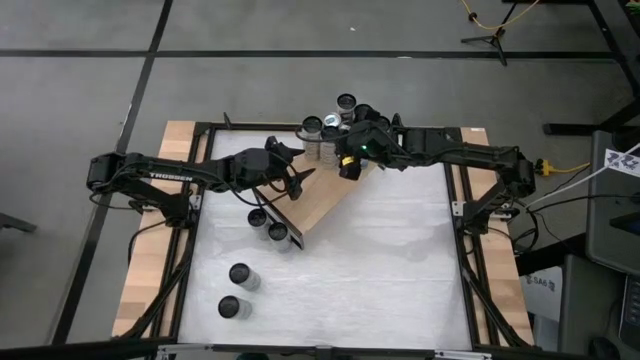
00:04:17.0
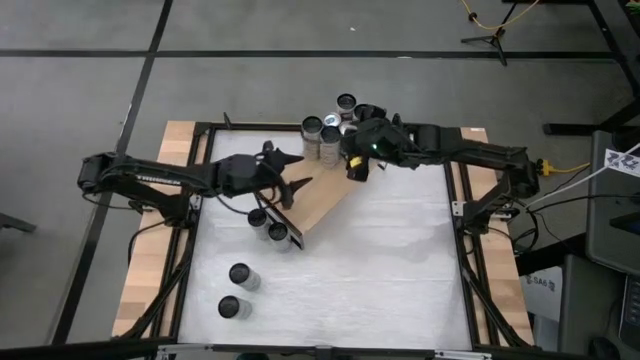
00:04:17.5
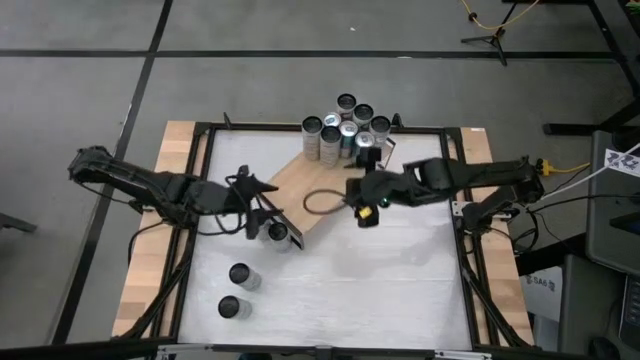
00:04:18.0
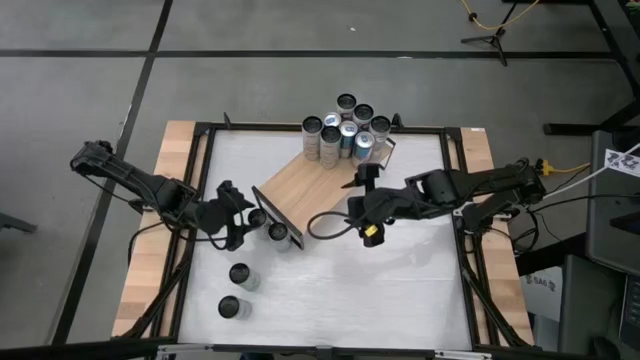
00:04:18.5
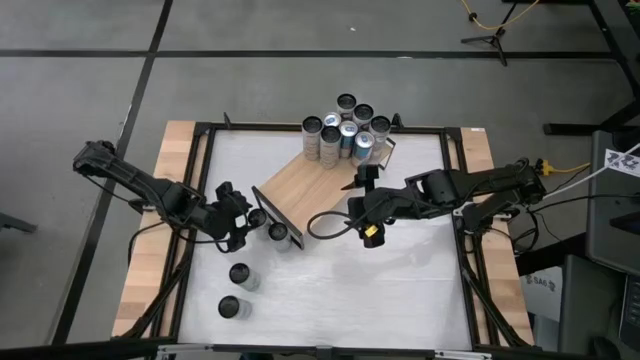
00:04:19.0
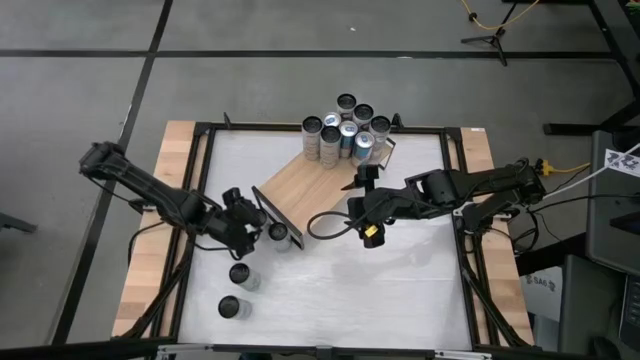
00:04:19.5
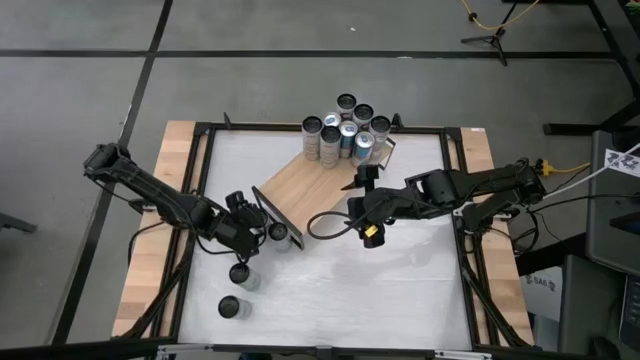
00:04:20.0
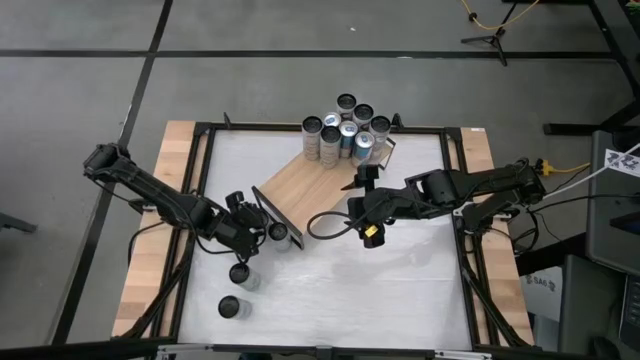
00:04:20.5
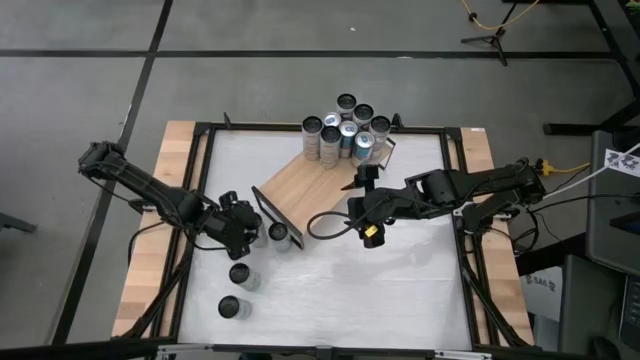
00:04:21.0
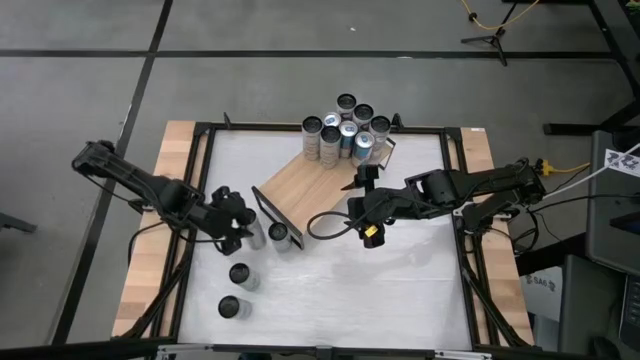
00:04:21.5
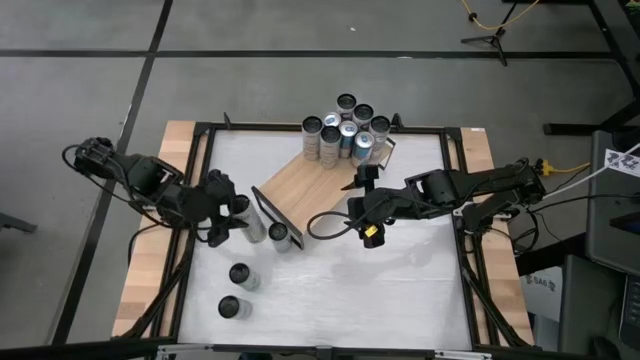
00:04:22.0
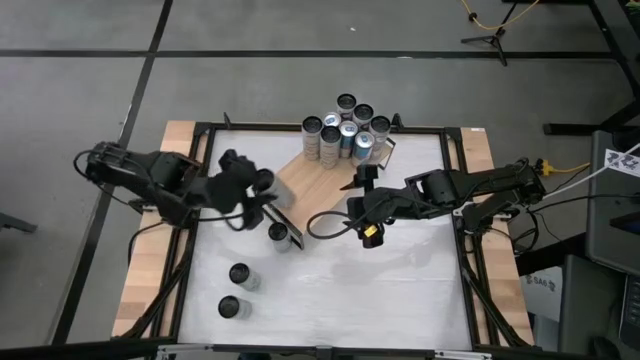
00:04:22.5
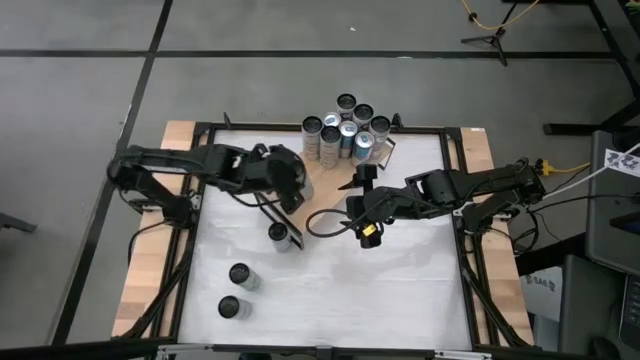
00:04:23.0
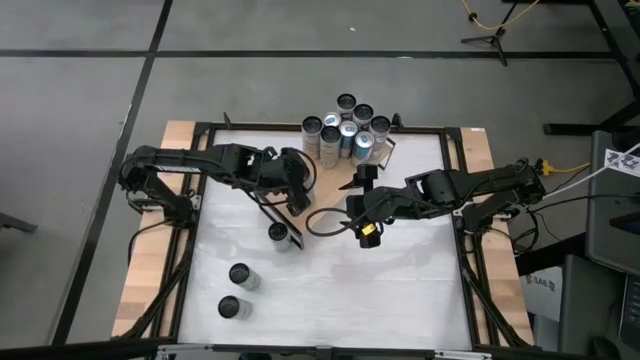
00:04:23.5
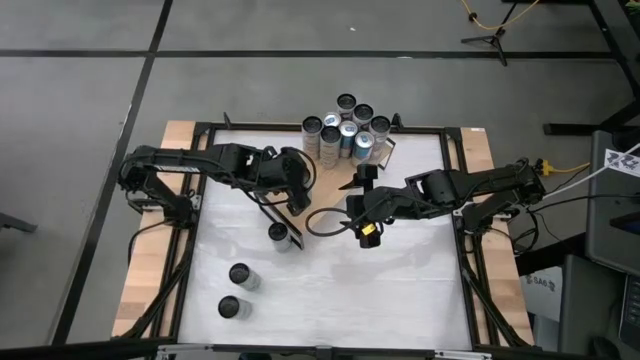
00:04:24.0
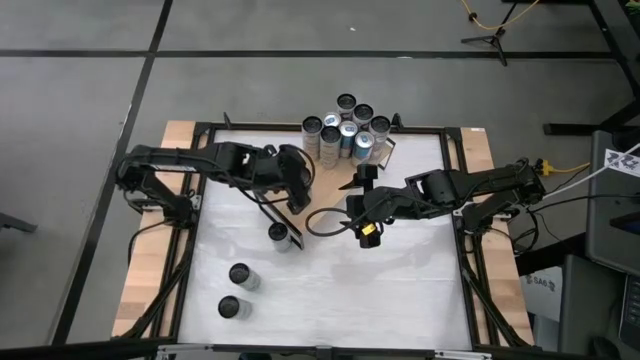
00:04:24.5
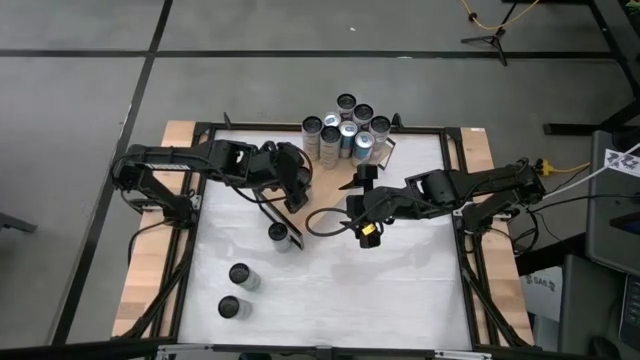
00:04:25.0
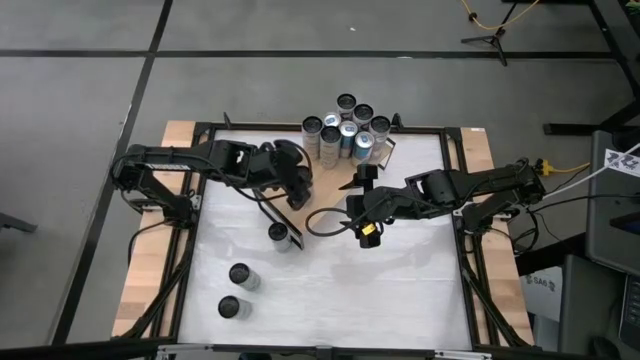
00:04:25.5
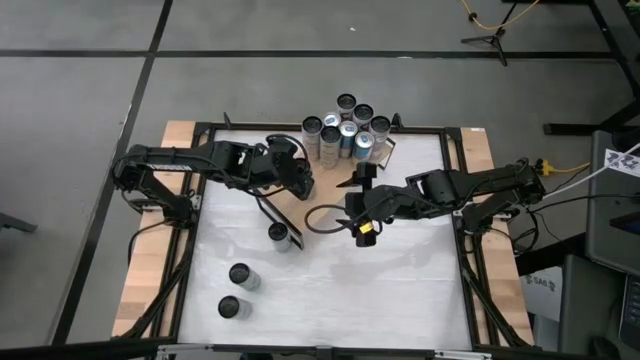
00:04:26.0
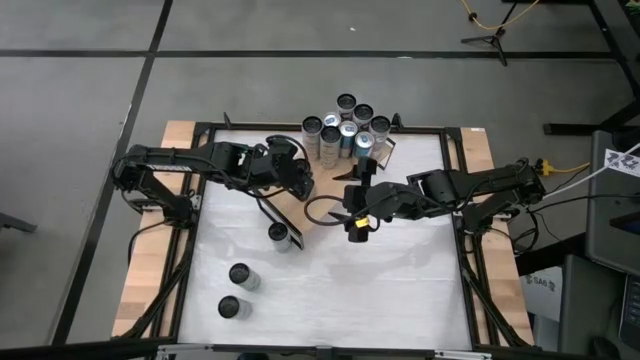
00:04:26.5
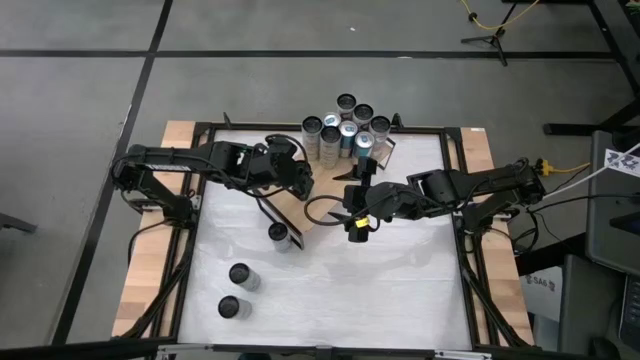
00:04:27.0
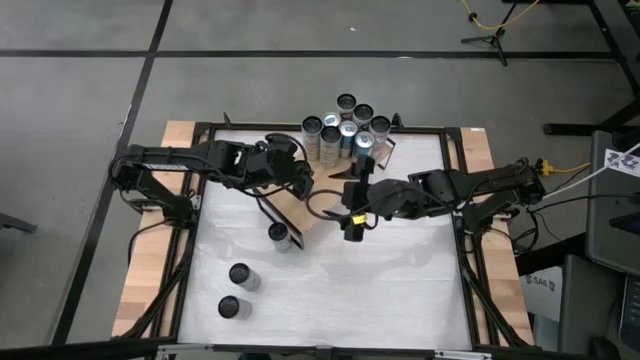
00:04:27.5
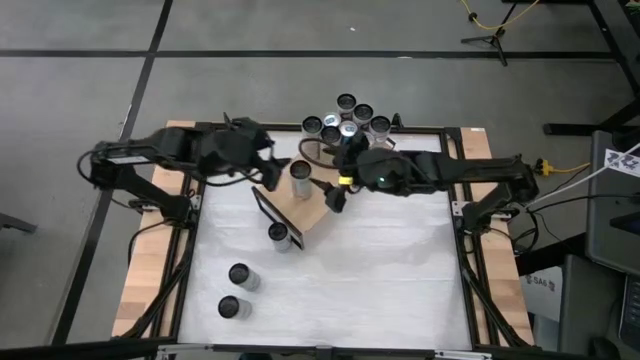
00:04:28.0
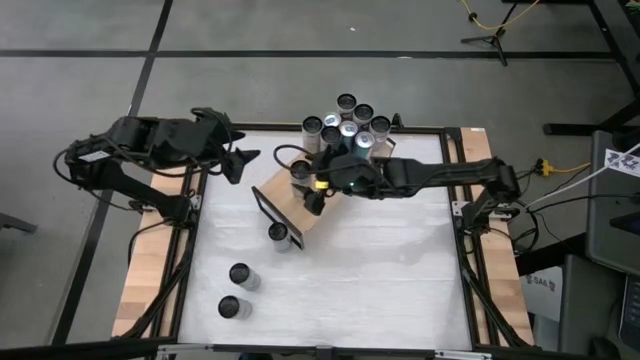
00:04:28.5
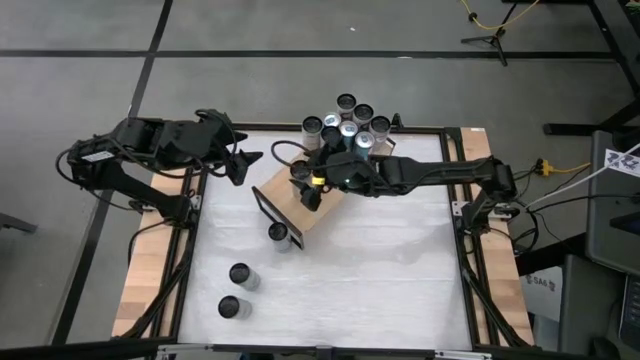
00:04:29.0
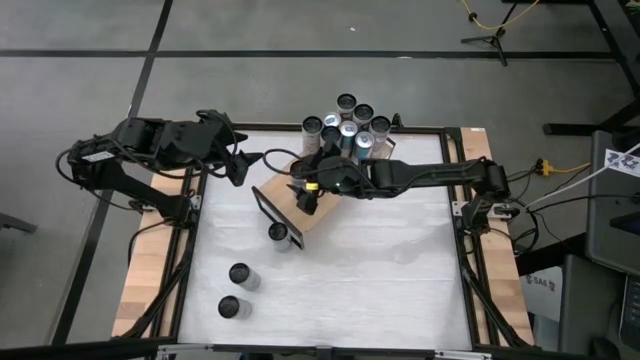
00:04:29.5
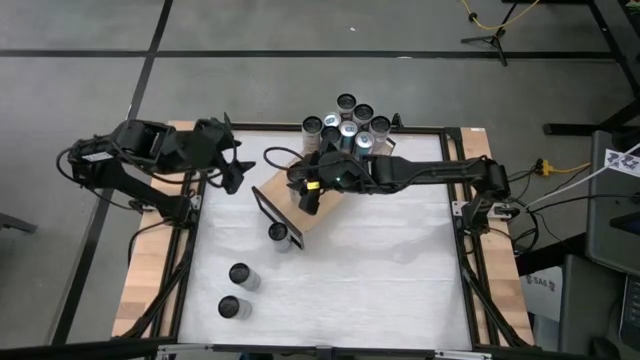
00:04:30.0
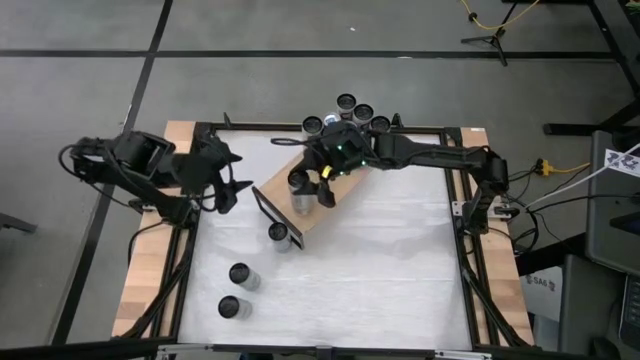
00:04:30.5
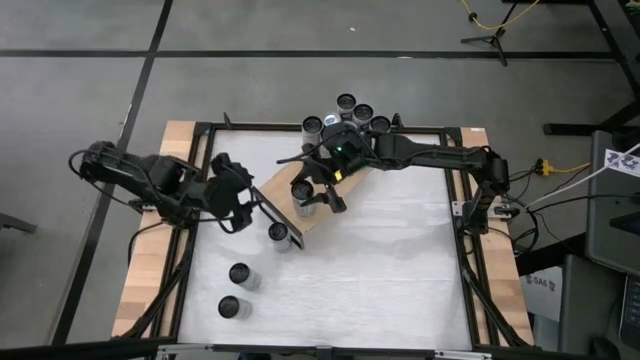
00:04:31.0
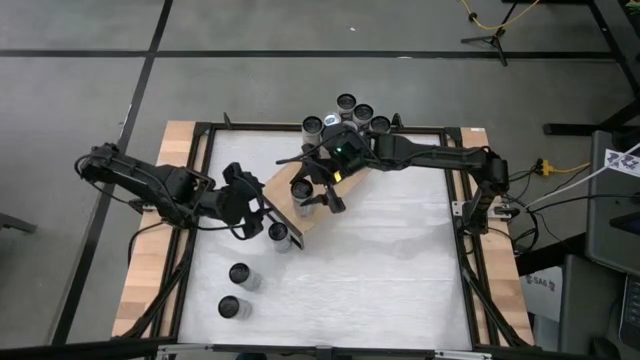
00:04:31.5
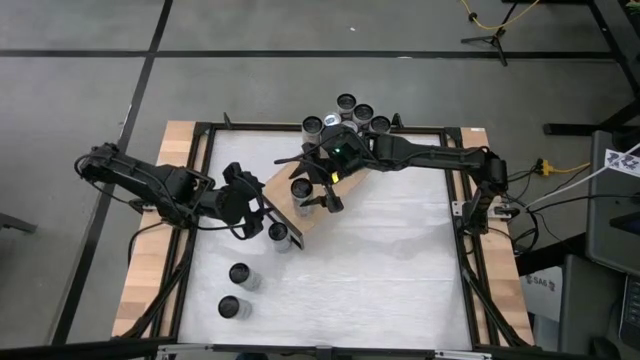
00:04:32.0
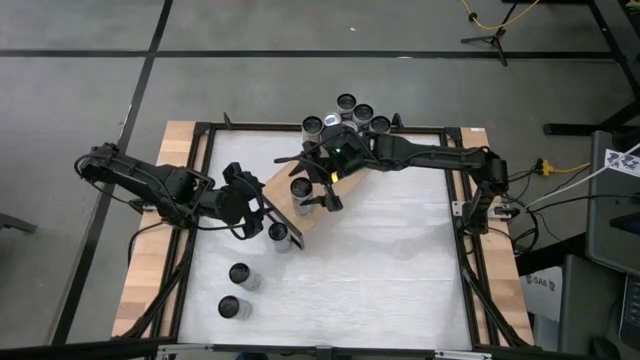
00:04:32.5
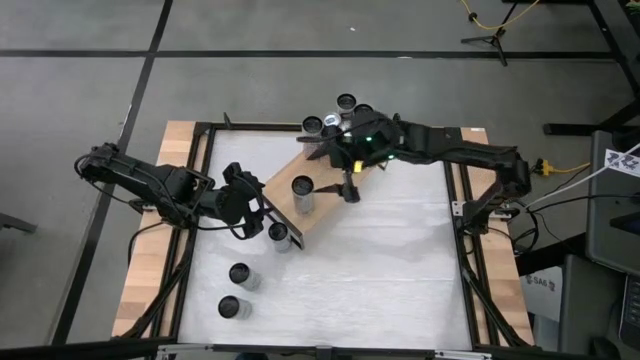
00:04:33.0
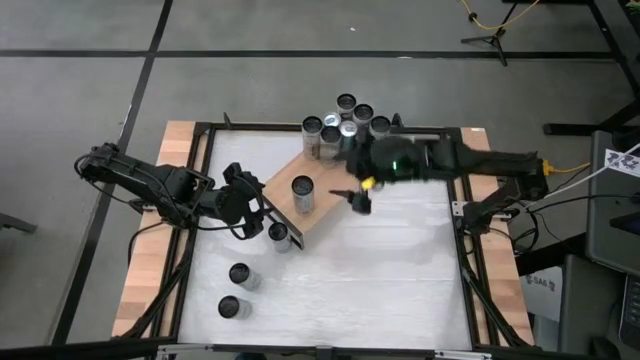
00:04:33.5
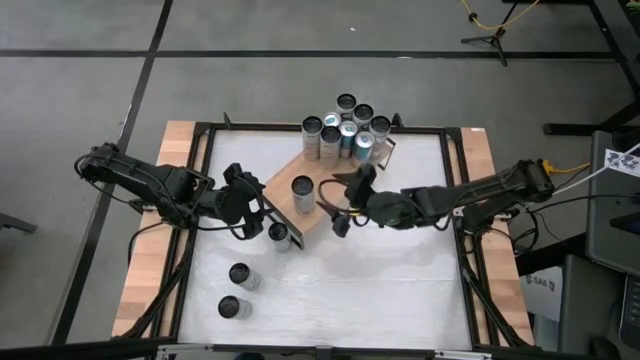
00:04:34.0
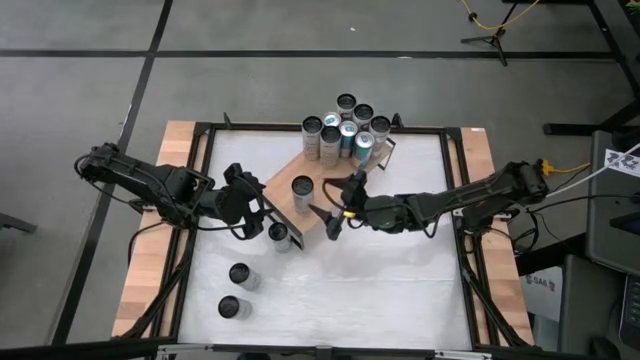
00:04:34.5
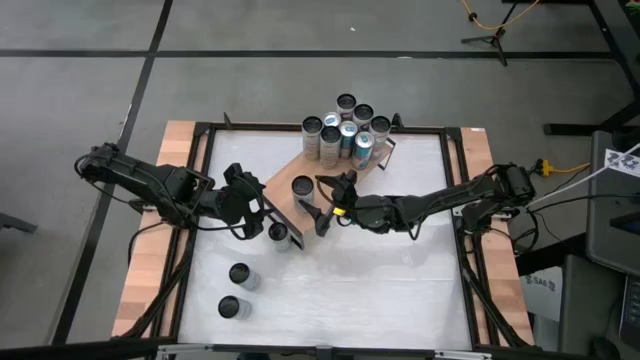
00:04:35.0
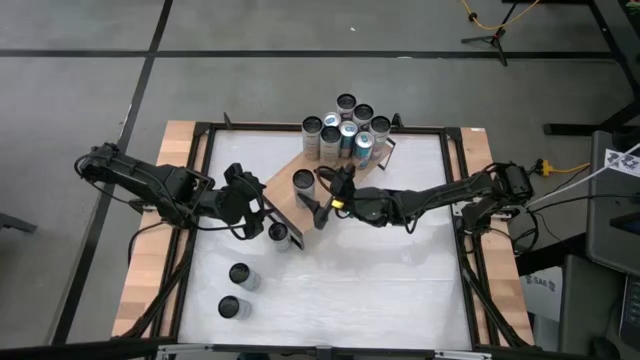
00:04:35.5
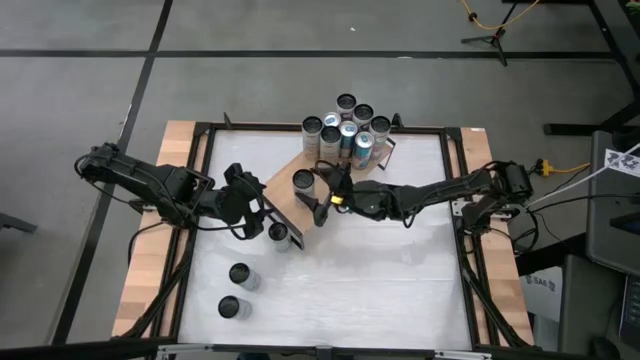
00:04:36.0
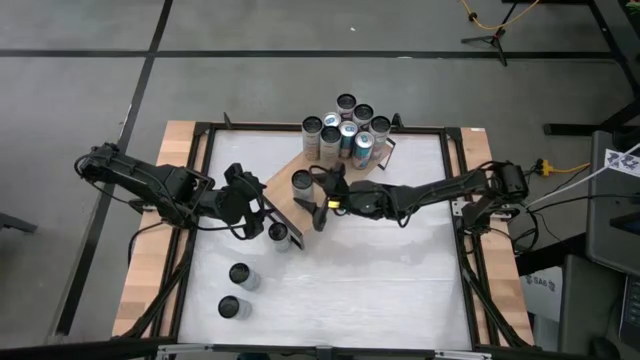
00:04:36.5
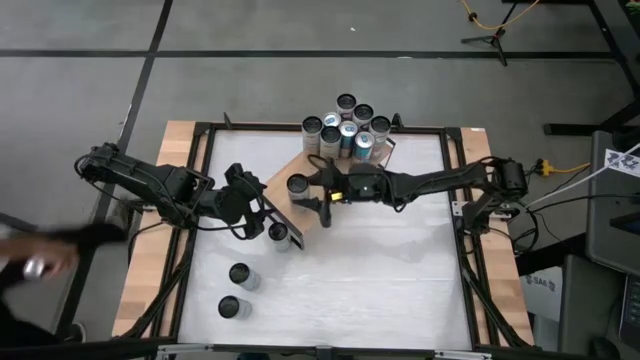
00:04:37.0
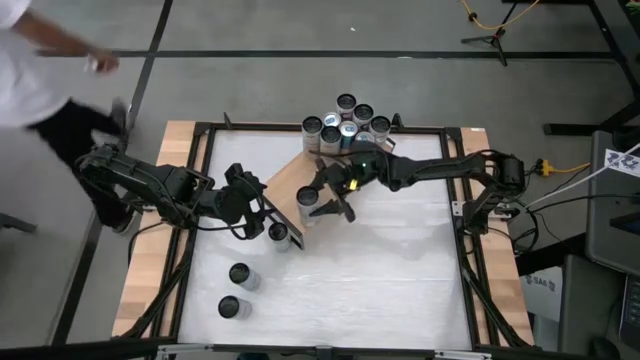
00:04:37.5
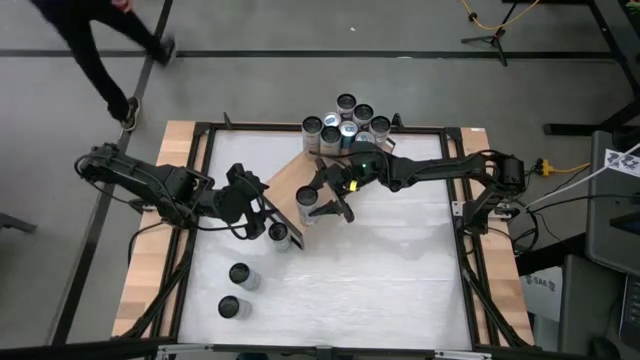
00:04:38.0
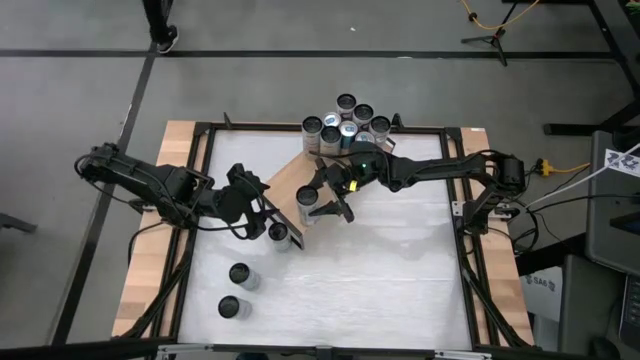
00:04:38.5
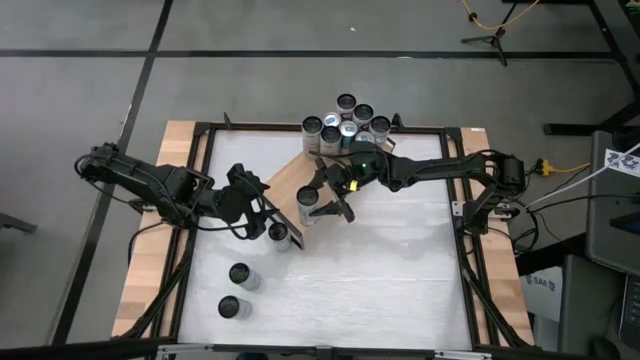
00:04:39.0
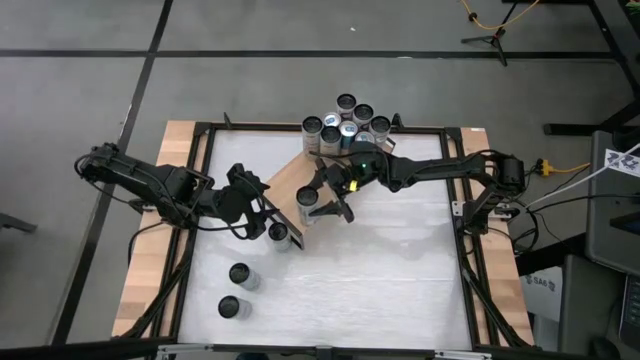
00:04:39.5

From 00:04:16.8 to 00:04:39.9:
Task: Place canned beverage on shelf
Put the white-yellow soda can on the shelf aligned with the other white-yellow soda cans
